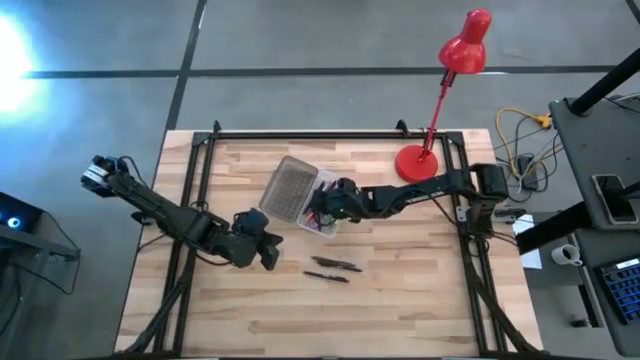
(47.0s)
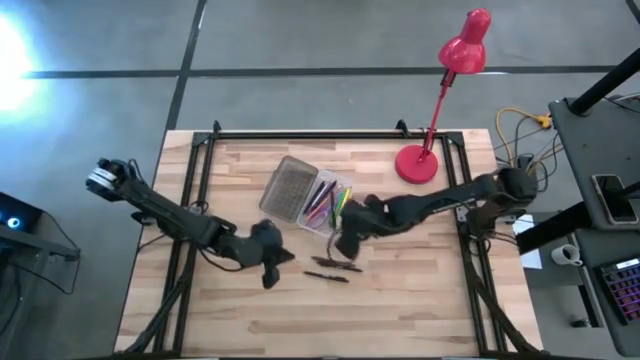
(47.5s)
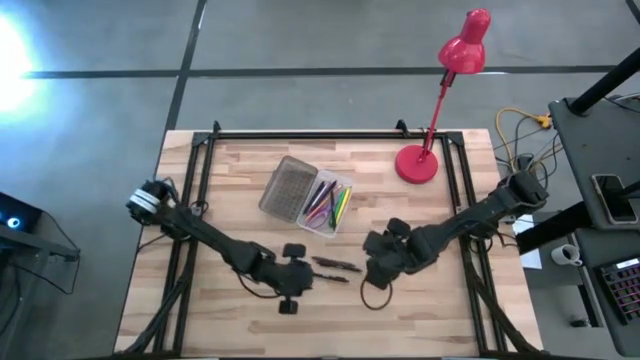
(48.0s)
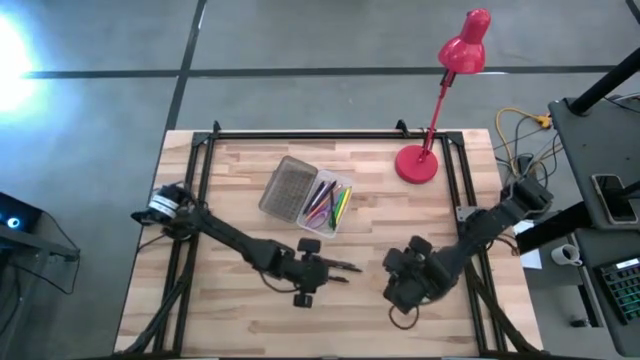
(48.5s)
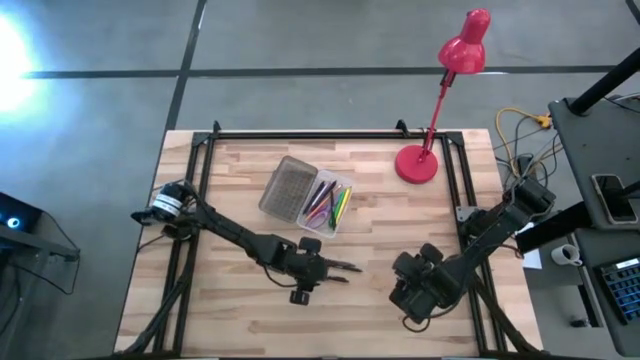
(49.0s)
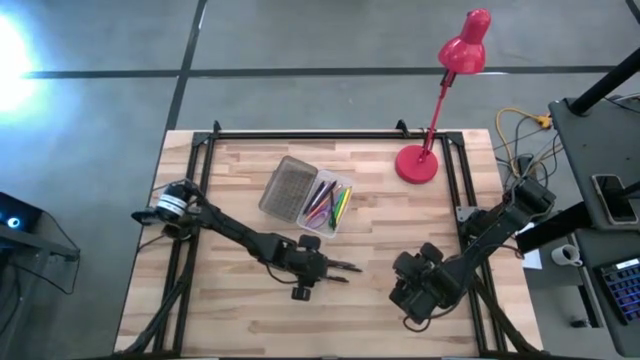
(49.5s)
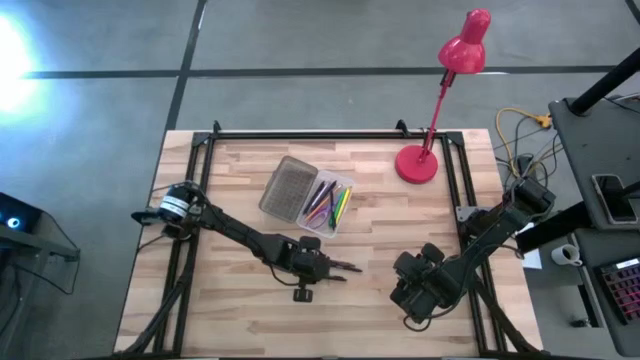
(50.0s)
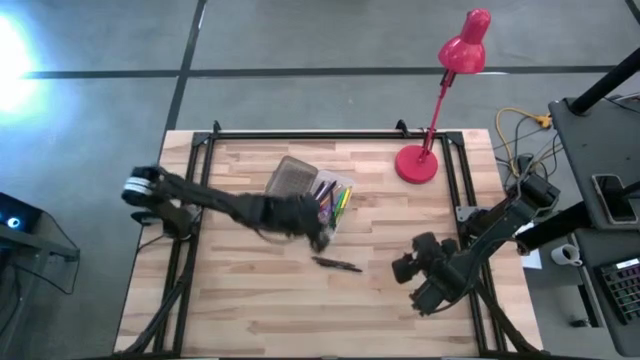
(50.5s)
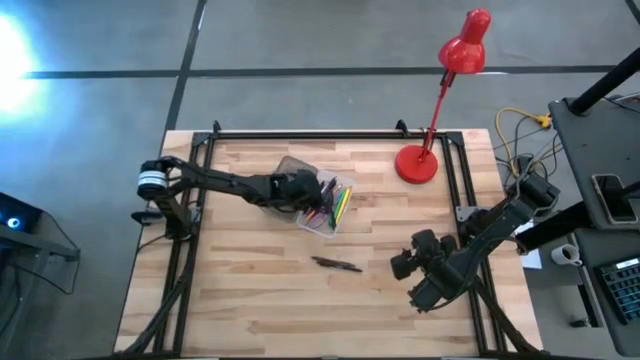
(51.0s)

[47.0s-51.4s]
Task: Pick & place school supplies into a supply box
Put the black pen into the supply box

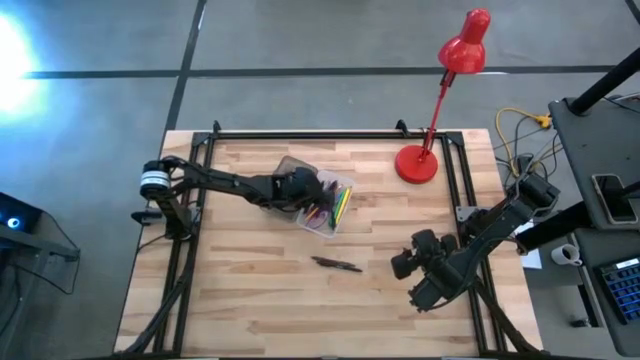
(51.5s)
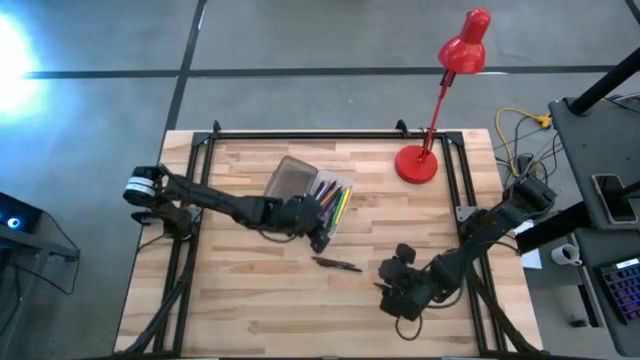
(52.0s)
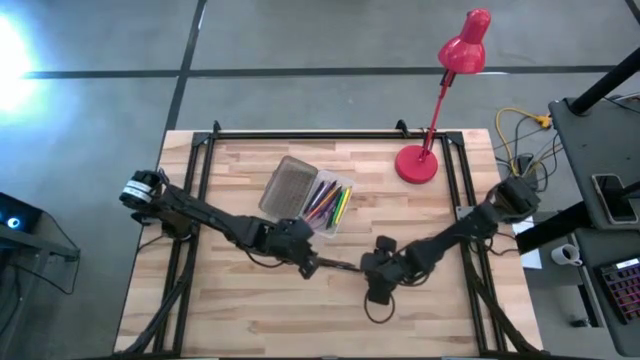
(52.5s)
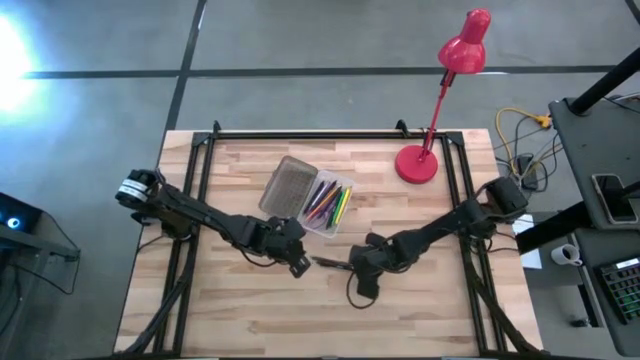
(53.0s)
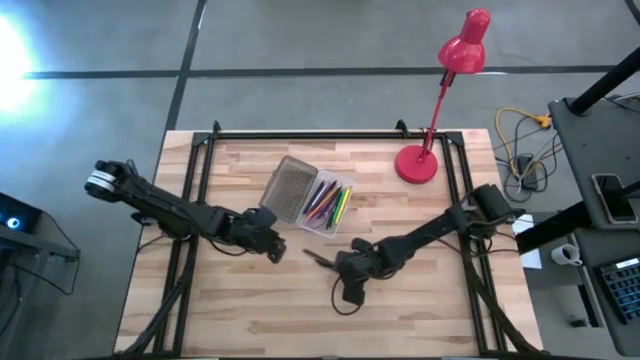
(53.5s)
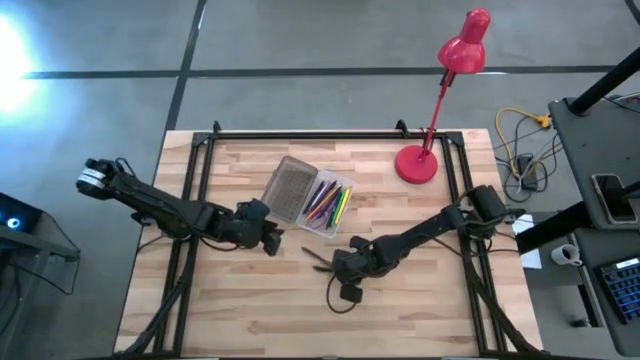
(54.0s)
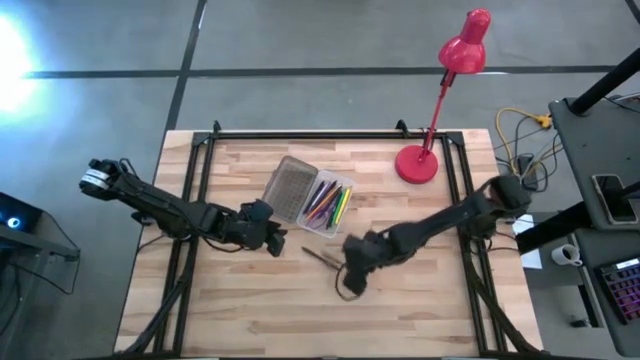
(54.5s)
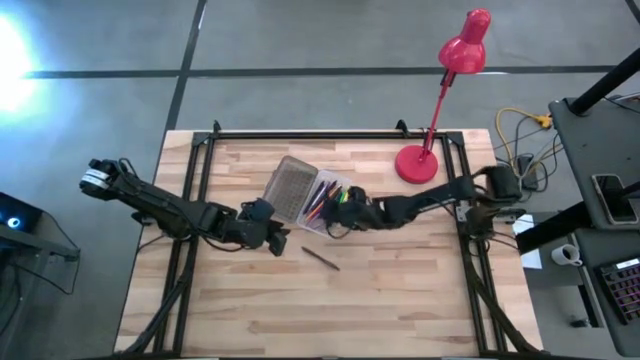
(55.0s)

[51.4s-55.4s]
Put the black pen into the supply box

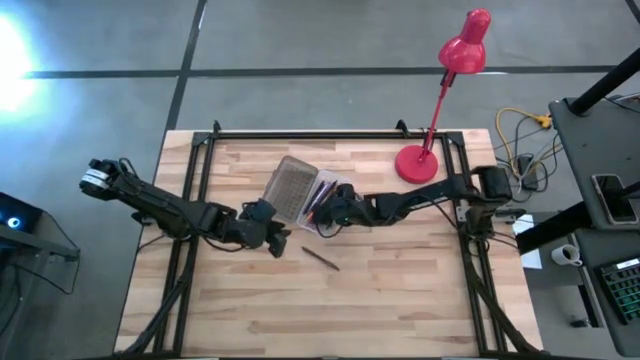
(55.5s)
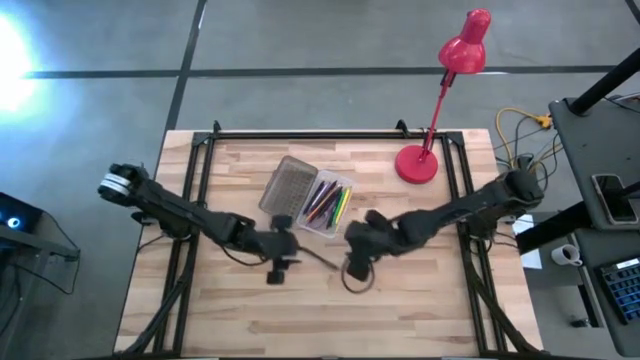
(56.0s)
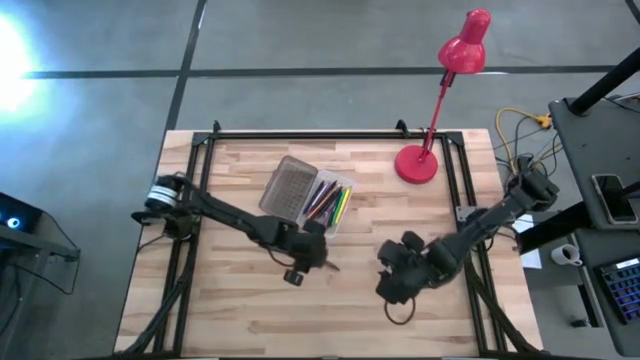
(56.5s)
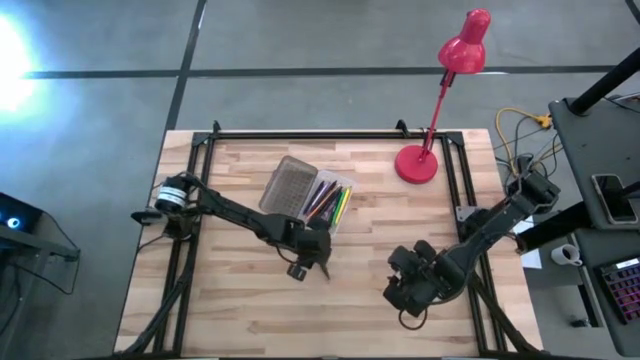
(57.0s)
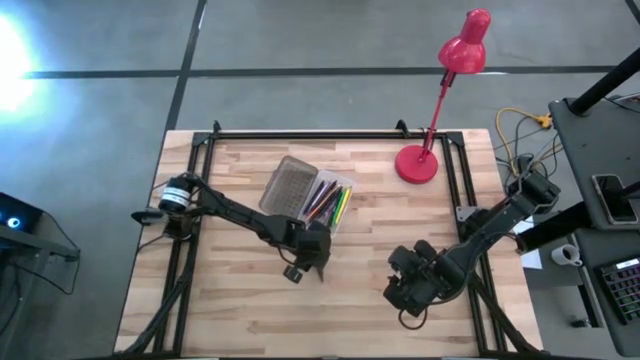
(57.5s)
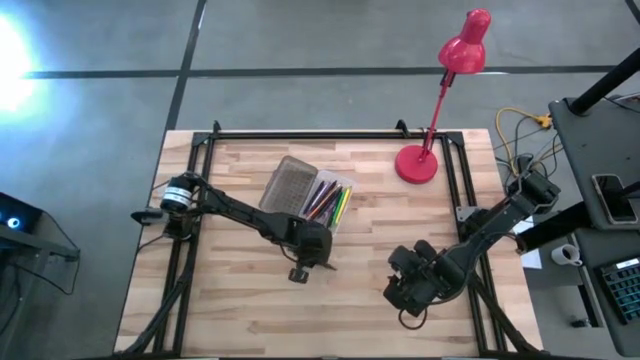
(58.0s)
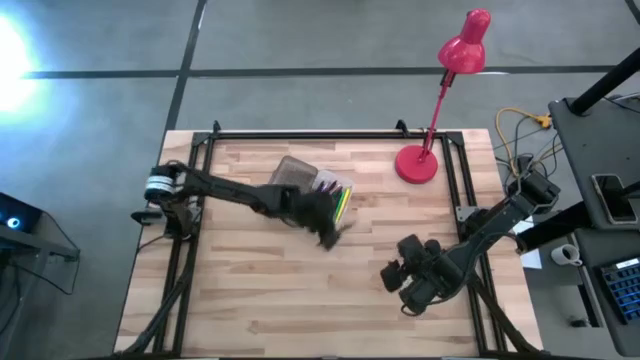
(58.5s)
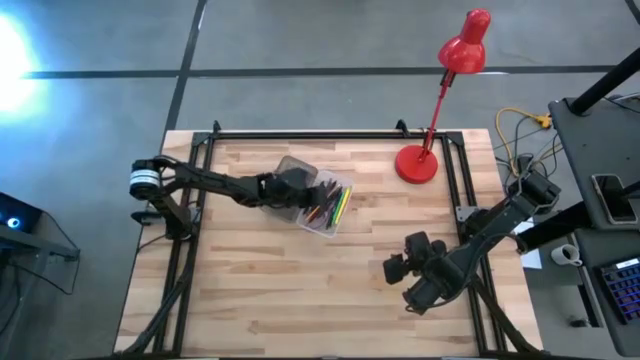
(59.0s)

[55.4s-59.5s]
Put the brown pen into the supply box

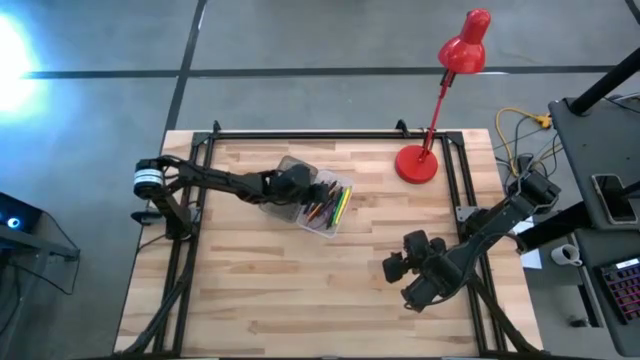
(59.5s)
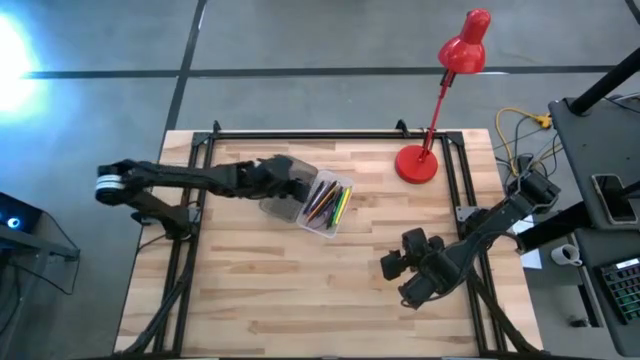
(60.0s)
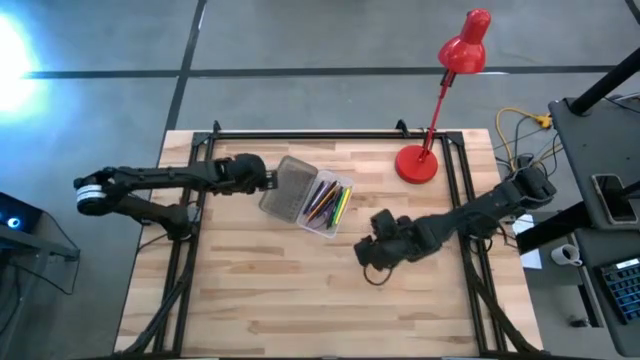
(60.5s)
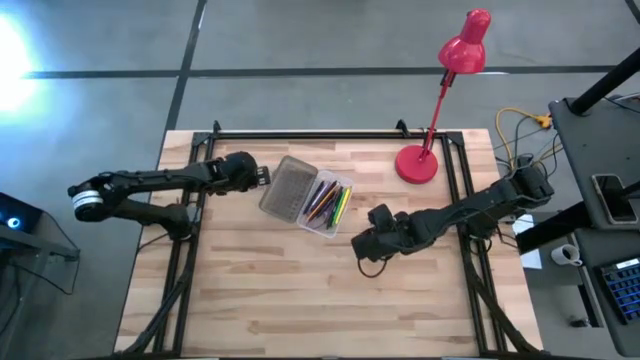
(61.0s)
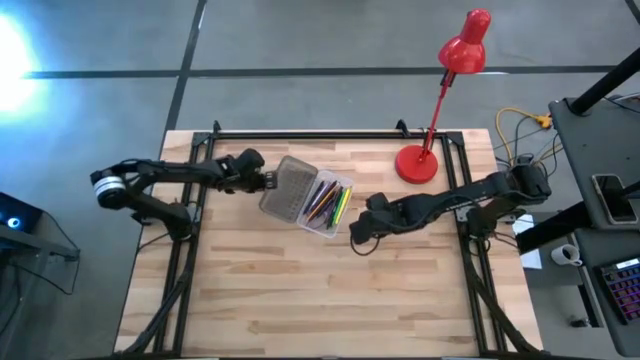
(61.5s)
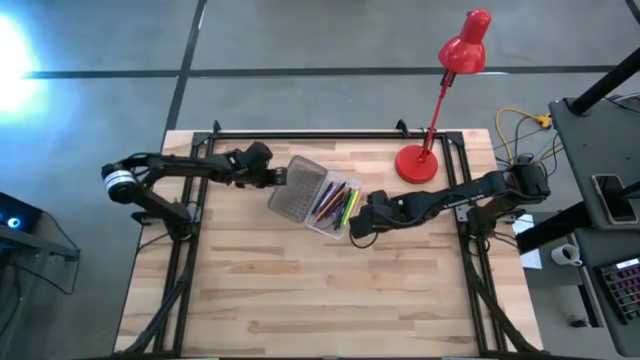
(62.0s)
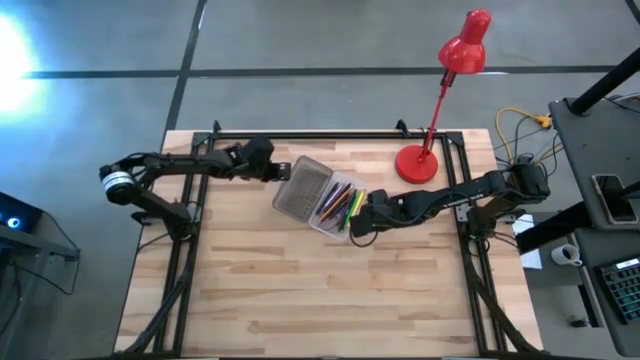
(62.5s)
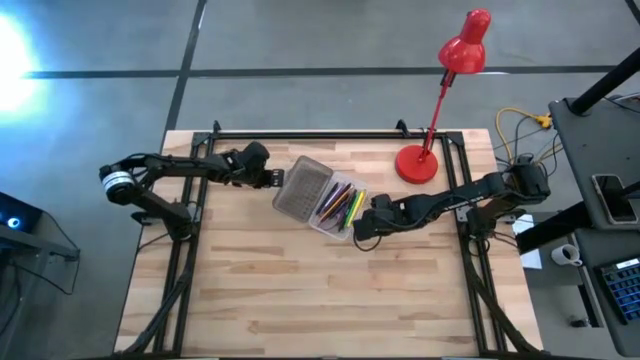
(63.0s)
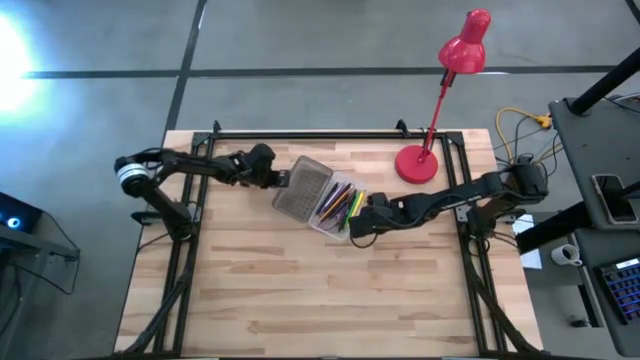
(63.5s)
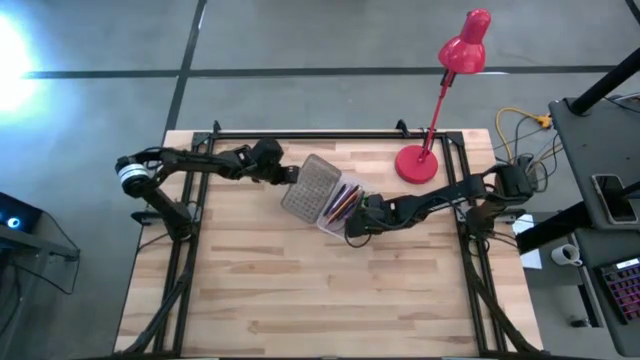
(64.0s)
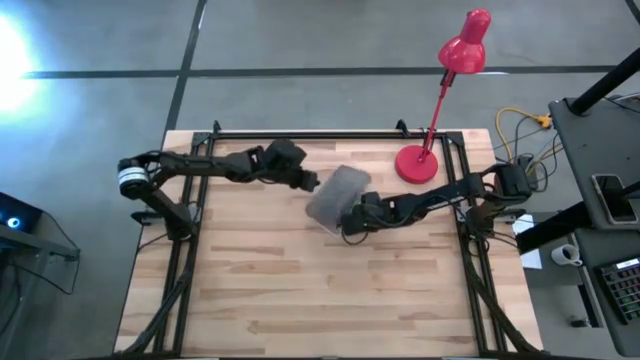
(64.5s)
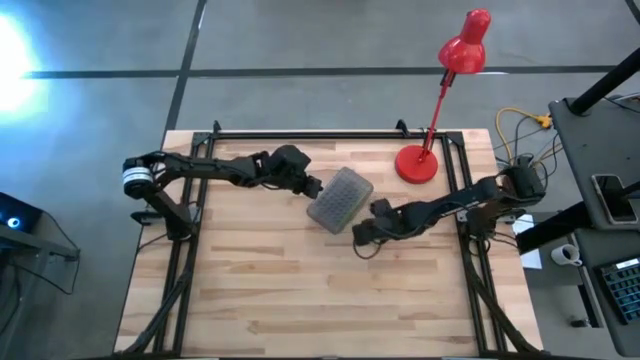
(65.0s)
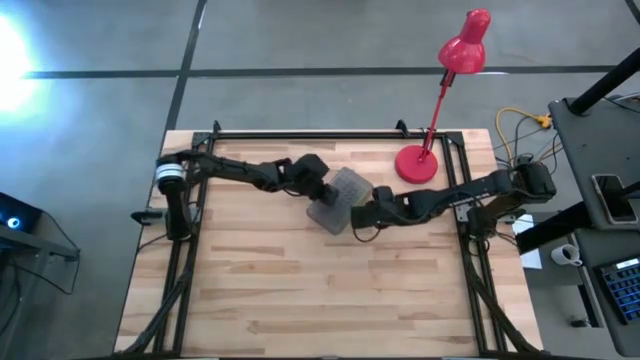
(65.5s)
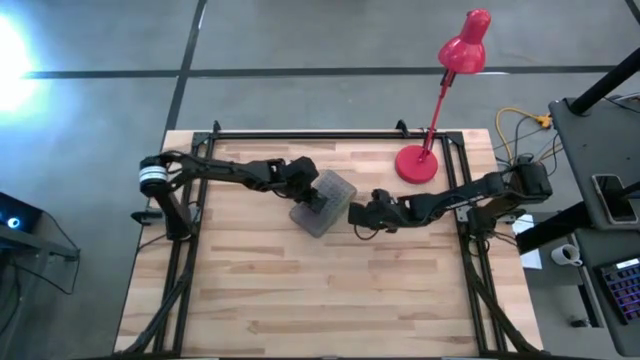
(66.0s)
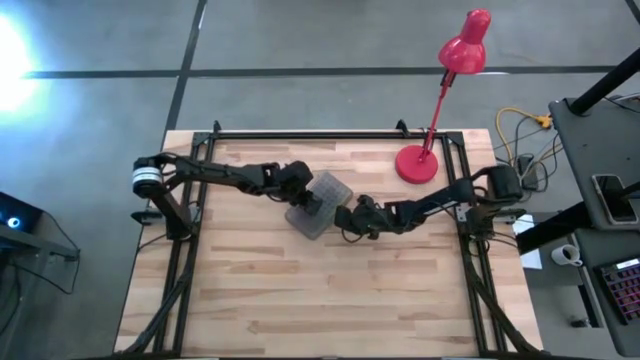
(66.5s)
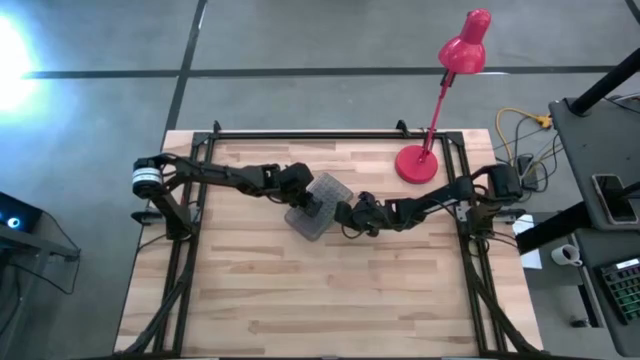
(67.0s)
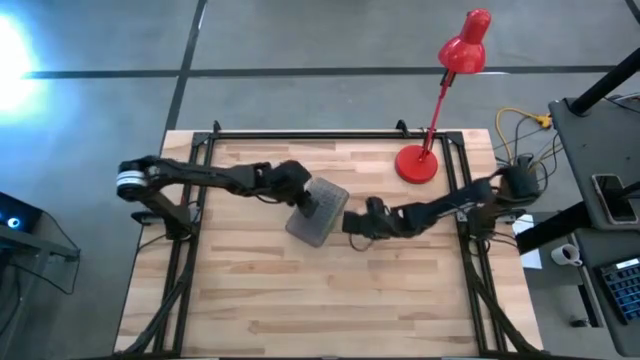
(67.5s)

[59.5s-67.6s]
Close the supply box

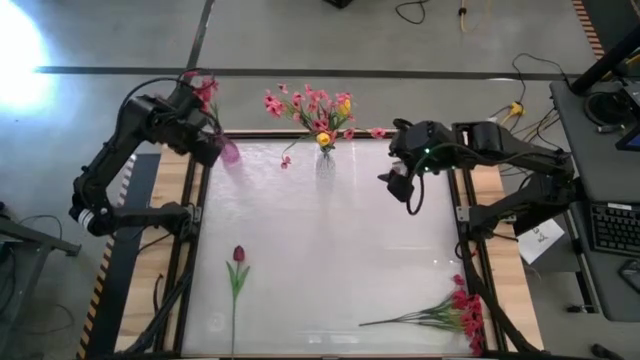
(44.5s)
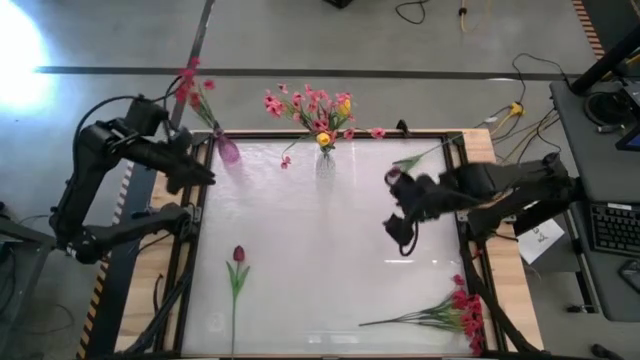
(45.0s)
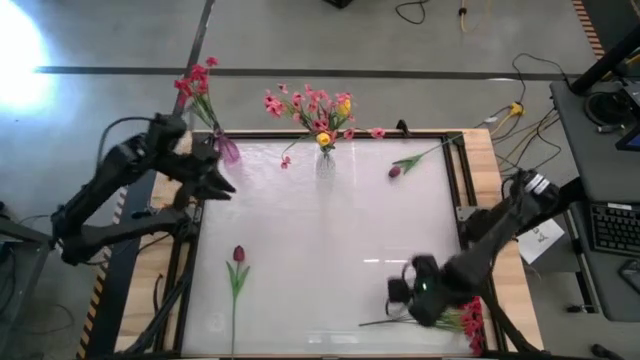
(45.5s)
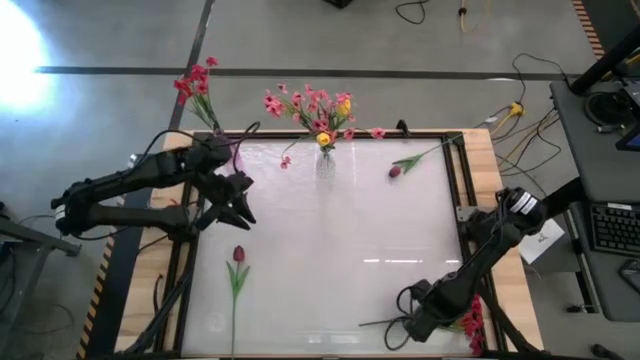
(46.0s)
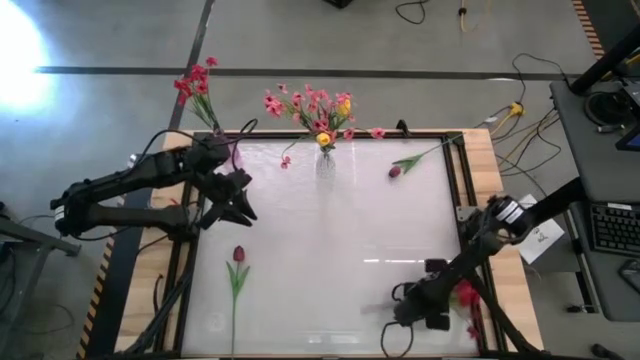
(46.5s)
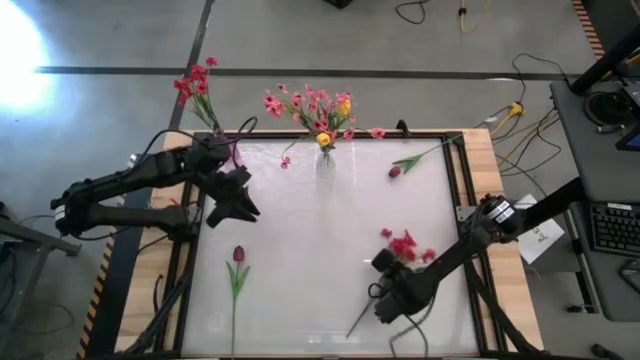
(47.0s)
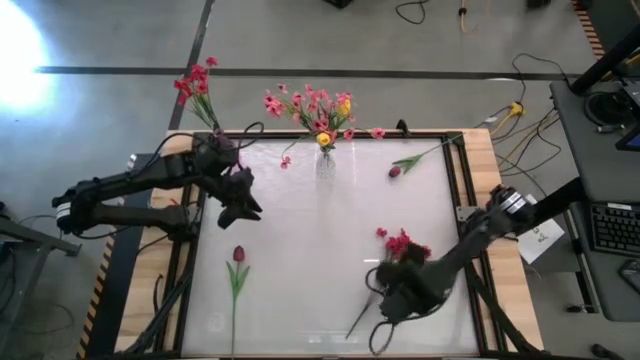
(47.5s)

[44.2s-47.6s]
Task: Sort flowers into vase by color
Put the red flowers into the purple vase
